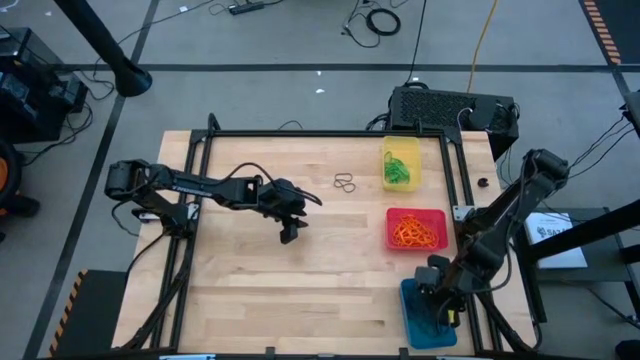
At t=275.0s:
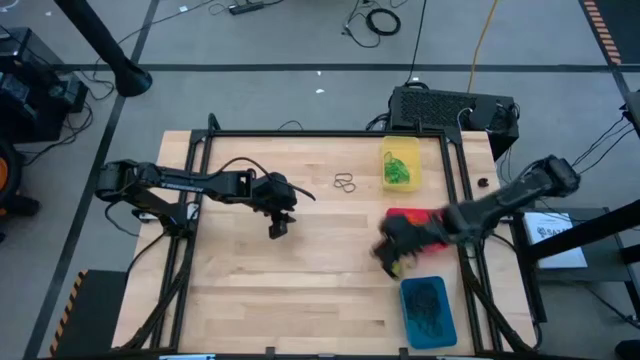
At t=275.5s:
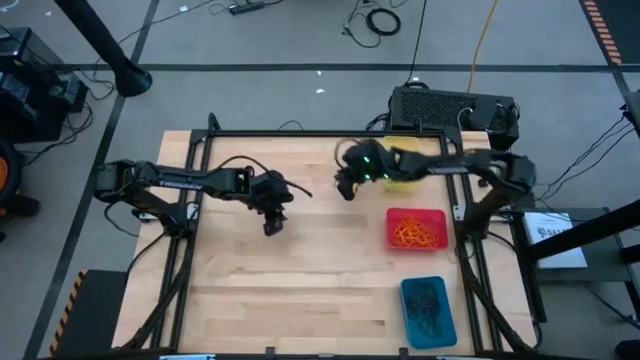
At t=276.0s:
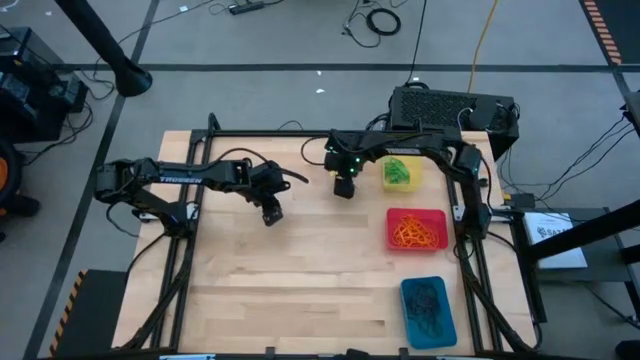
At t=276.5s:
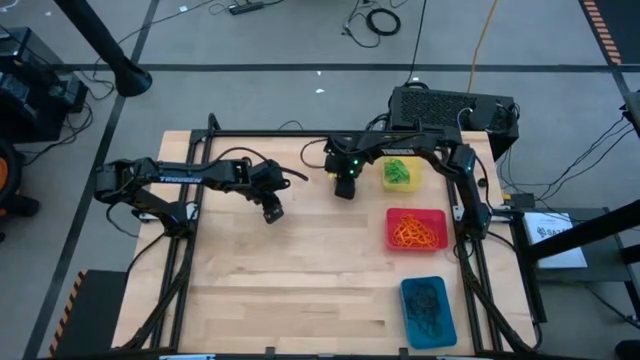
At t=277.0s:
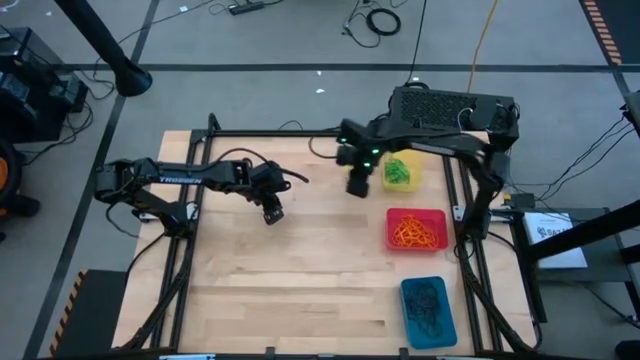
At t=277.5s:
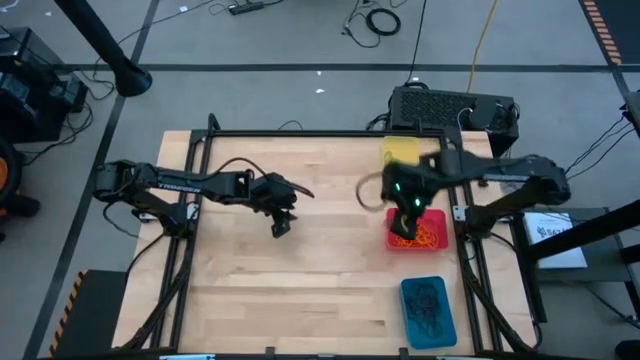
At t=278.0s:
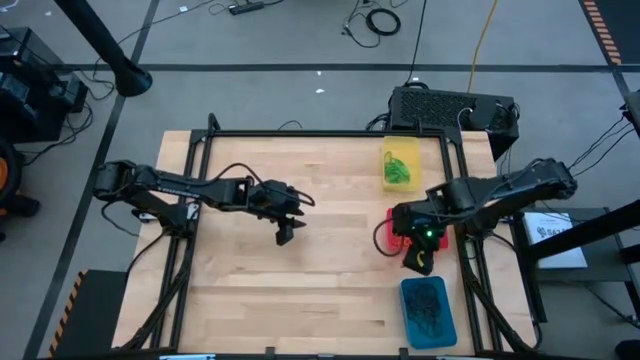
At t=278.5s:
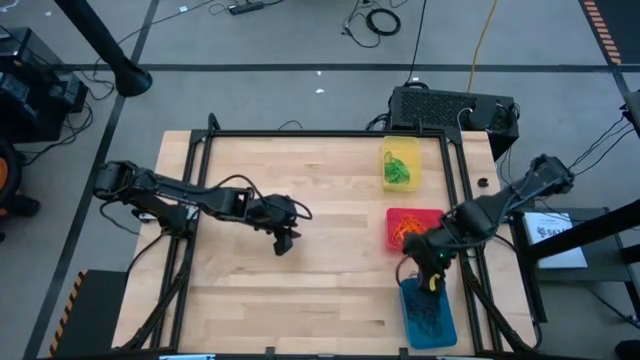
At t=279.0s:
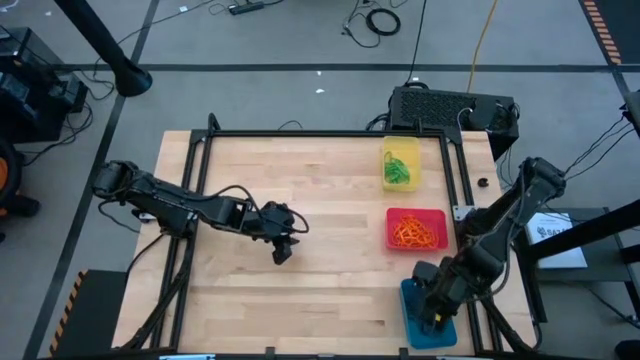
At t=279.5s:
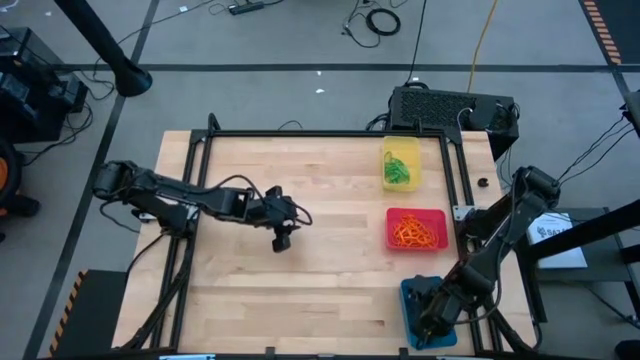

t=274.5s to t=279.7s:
Task: Sort rubber bands into baskets
Put the violet rubber band into the blue bin

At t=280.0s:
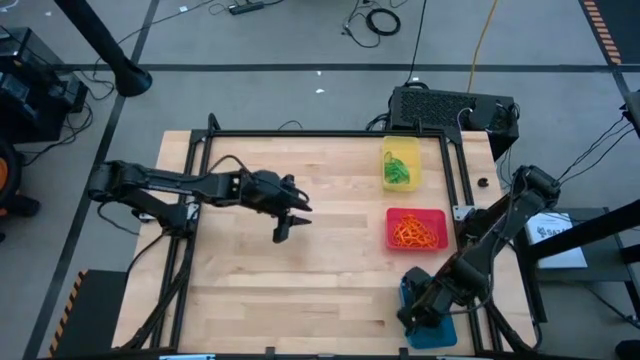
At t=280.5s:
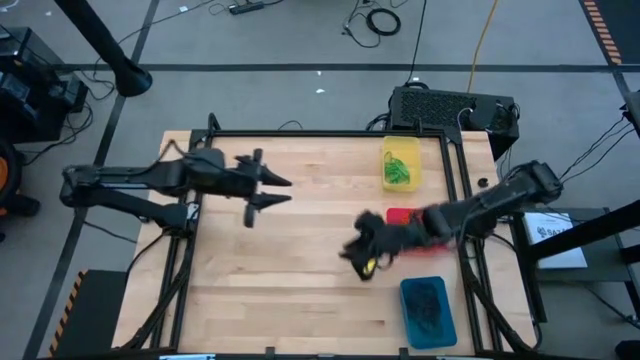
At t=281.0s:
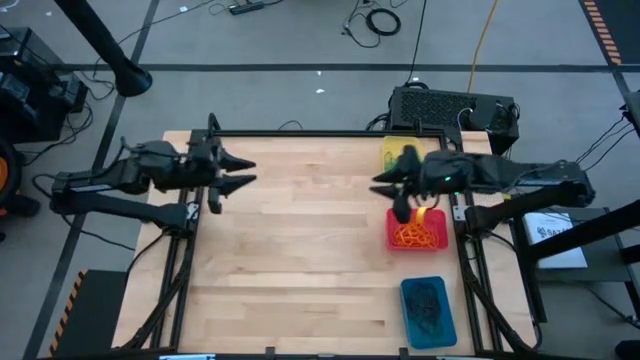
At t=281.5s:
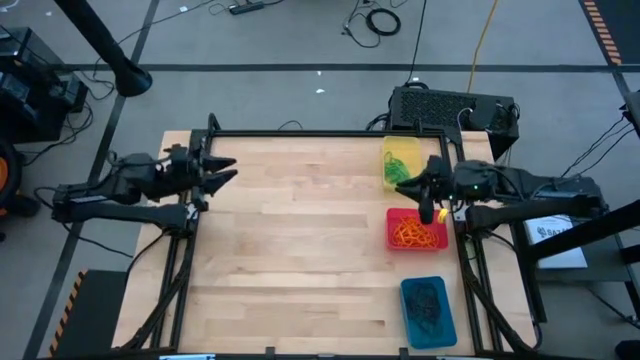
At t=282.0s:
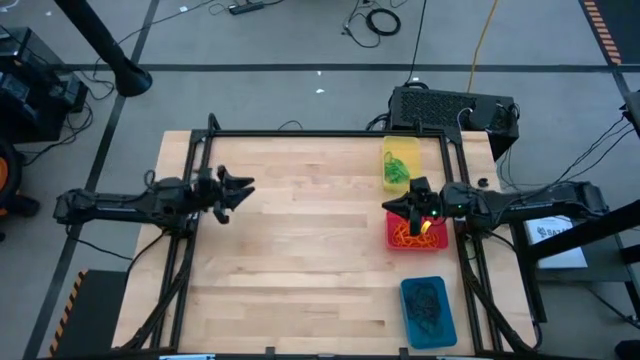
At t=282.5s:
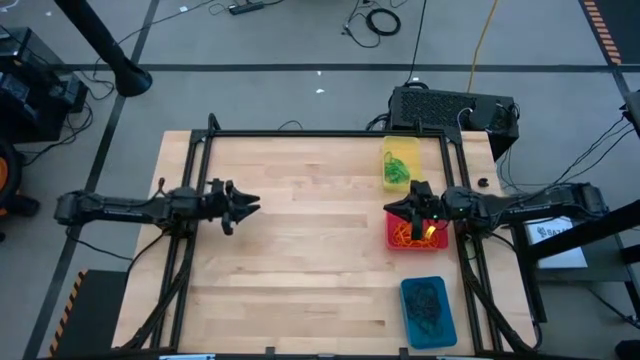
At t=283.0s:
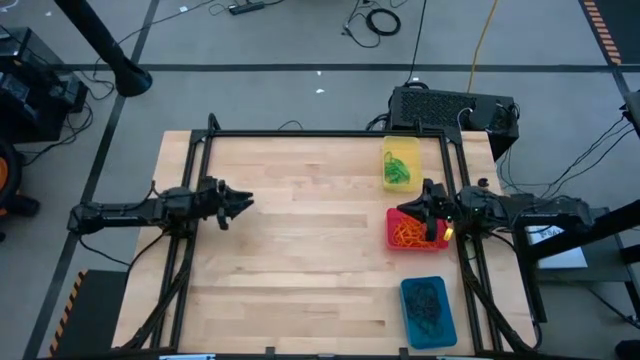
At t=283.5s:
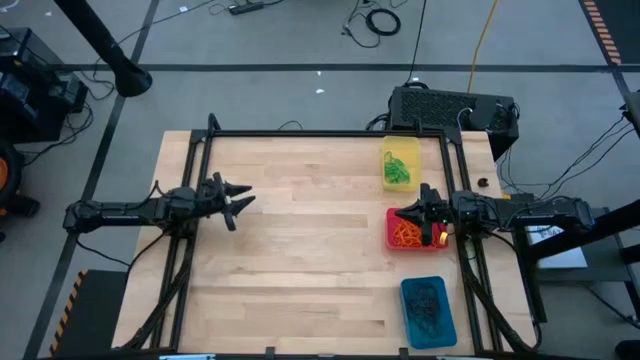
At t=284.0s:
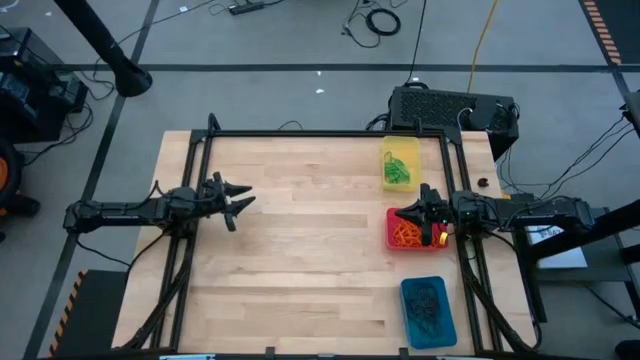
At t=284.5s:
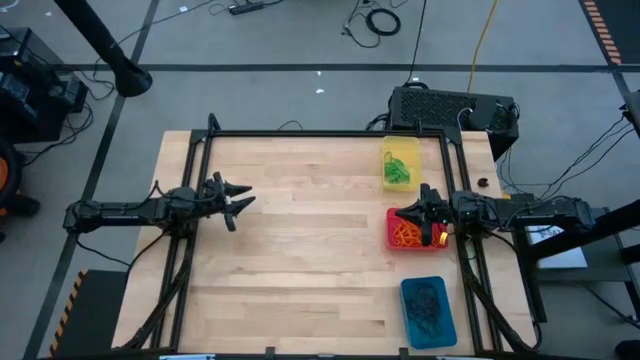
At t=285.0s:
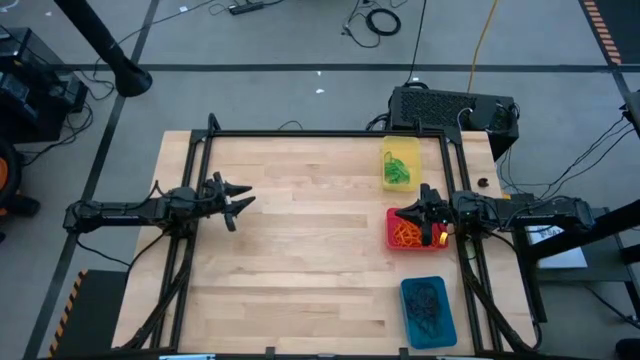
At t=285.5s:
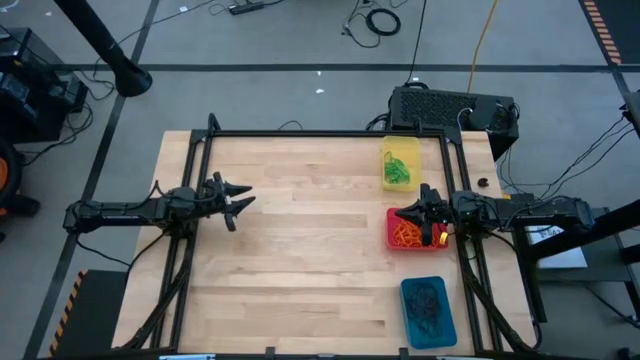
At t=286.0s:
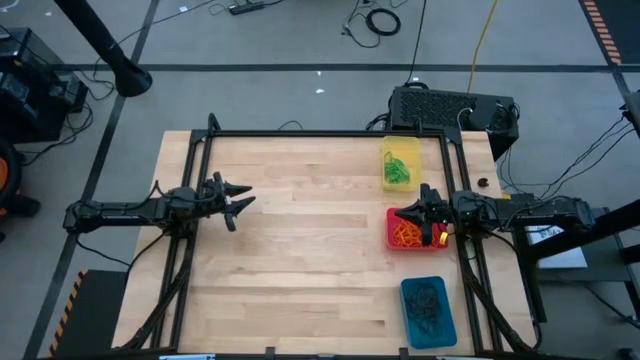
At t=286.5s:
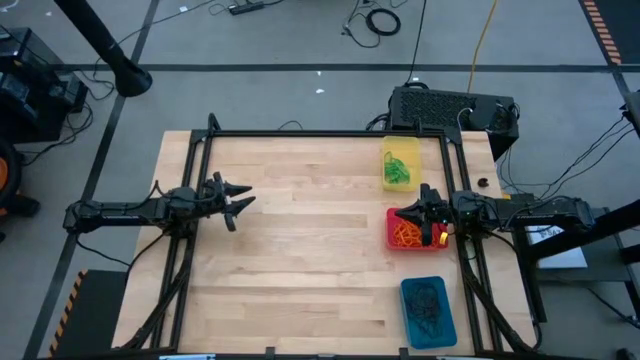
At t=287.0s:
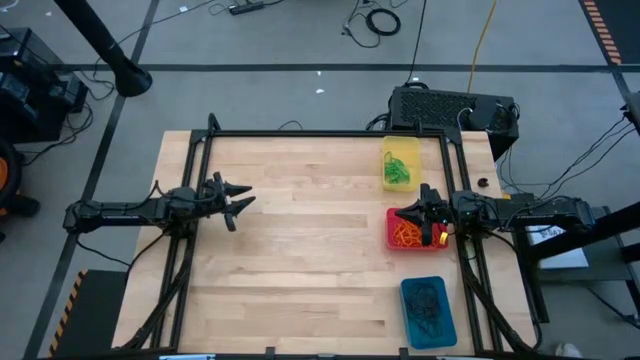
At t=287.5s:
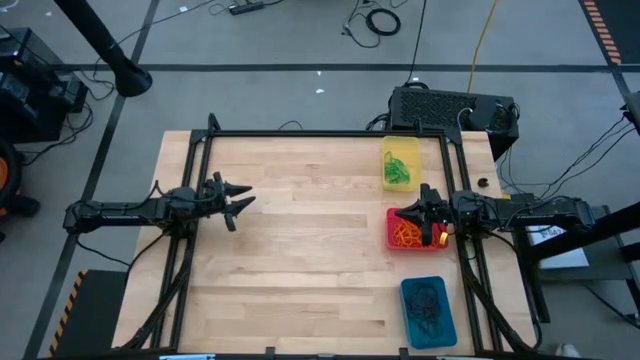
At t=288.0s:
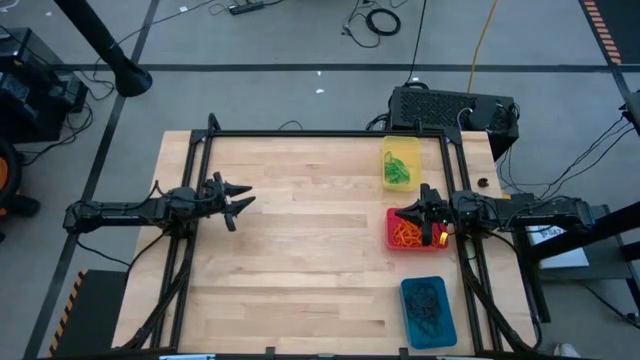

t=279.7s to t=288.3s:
Return to Home Position

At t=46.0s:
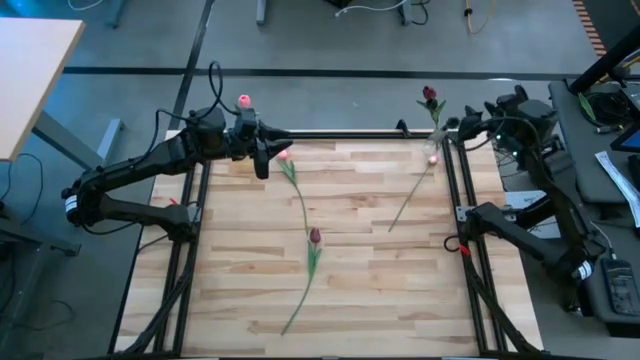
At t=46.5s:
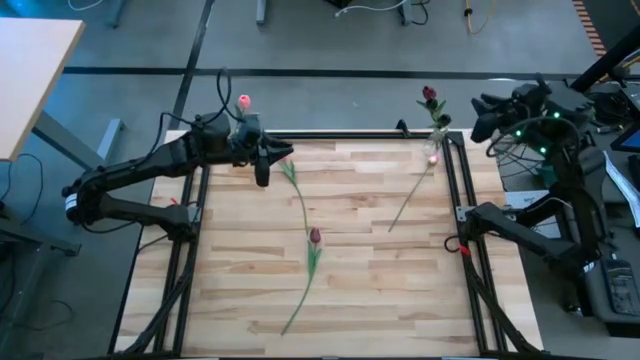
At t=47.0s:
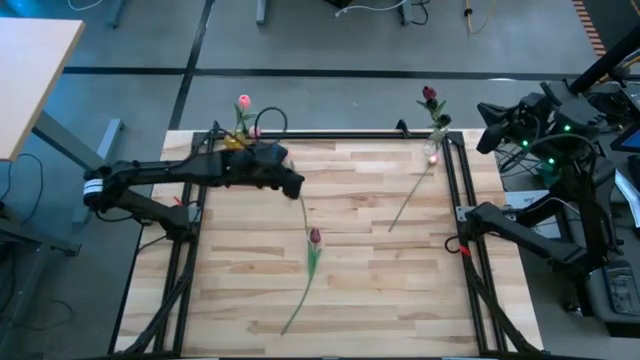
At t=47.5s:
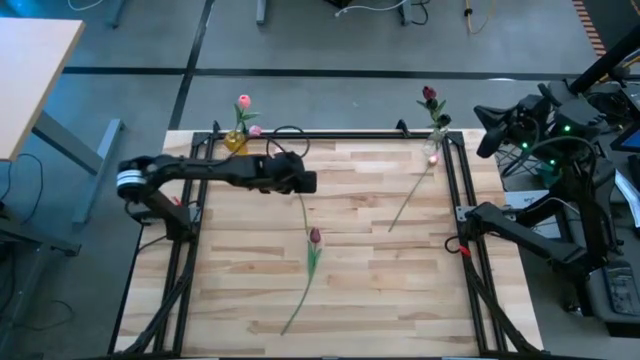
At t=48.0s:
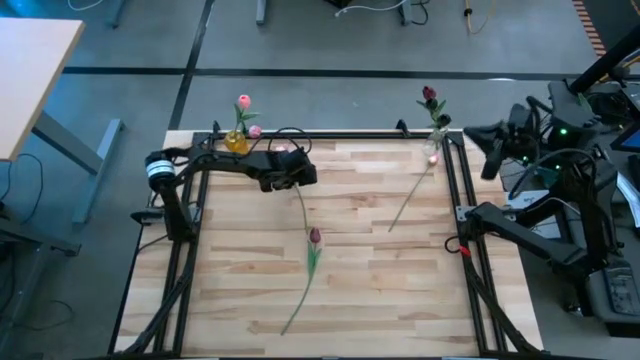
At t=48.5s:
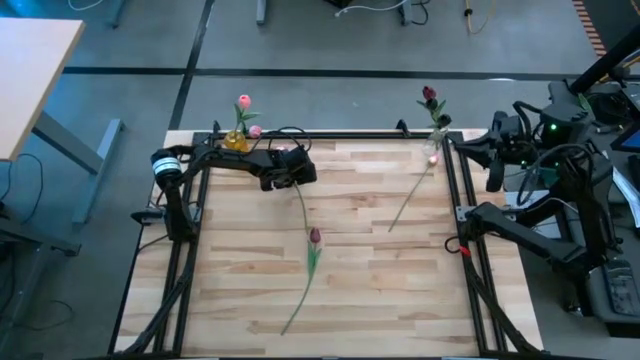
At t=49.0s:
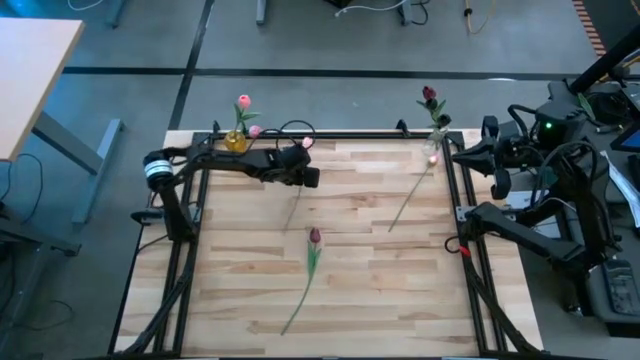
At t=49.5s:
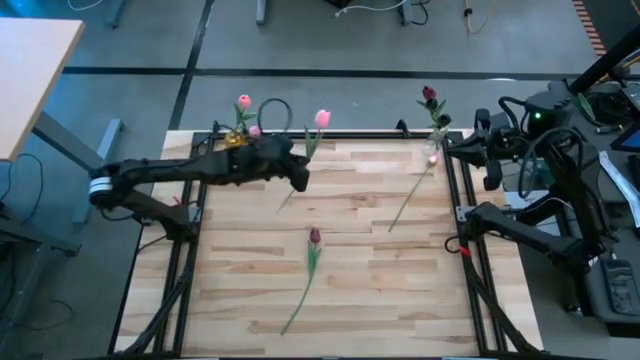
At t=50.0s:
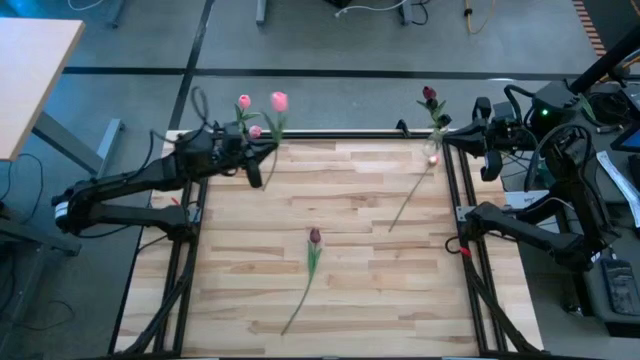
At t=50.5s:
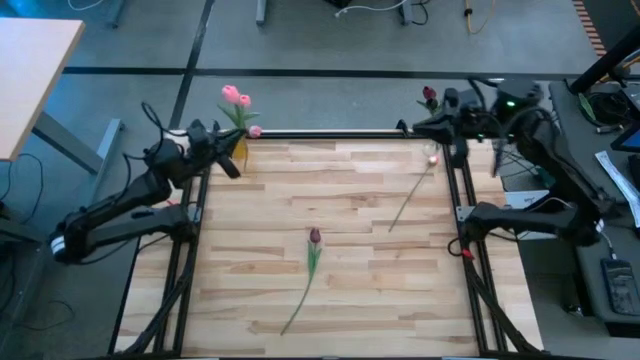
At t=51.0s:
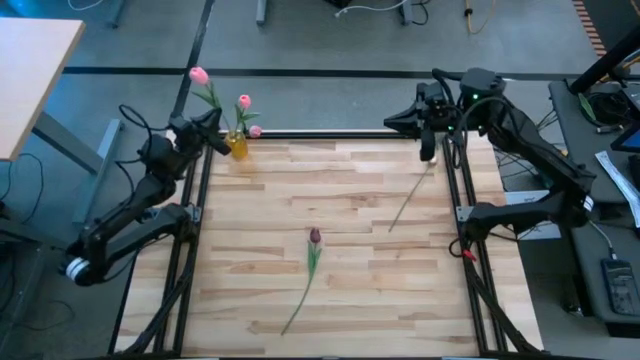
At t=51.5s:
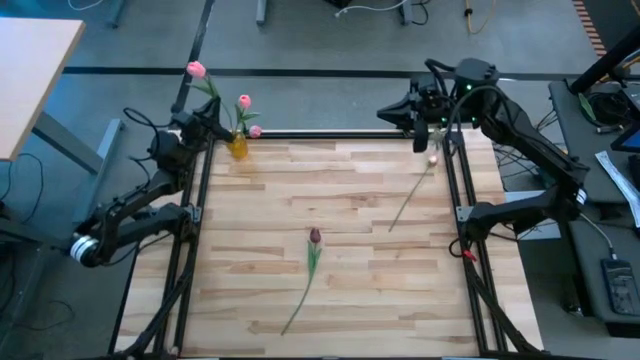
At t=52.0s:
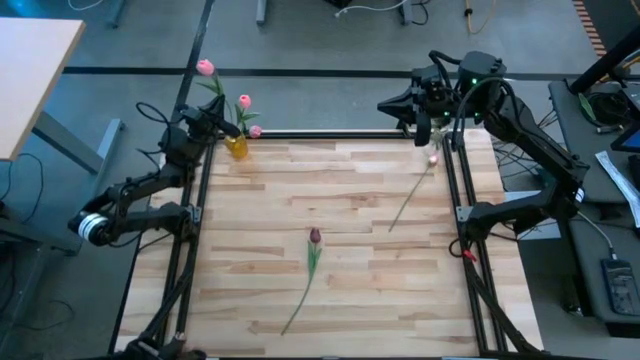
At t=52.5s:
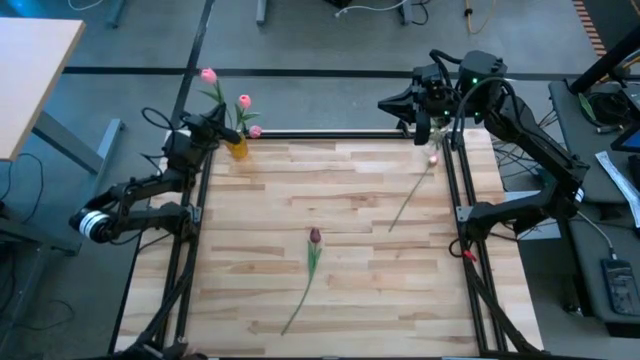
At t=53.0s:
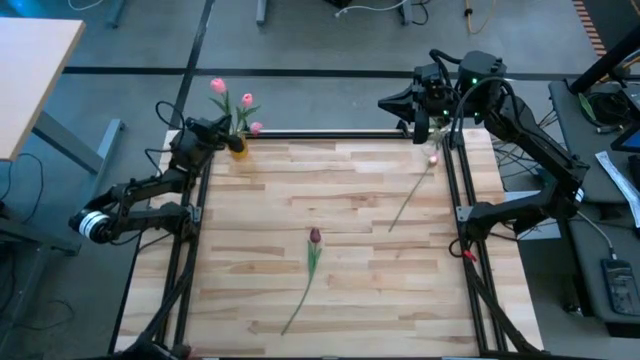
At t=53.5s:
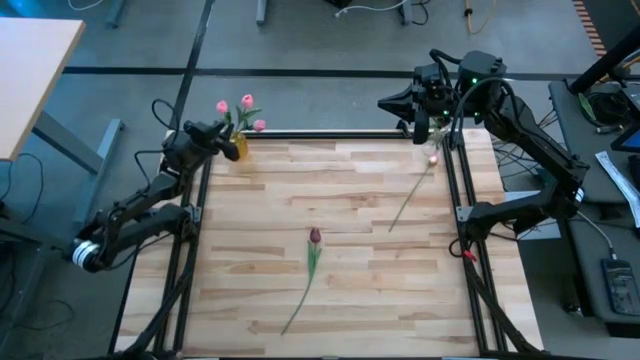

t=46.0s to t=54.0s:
Task: Sort flowers into vase by color
Put the pink tulip into the yellow vase
